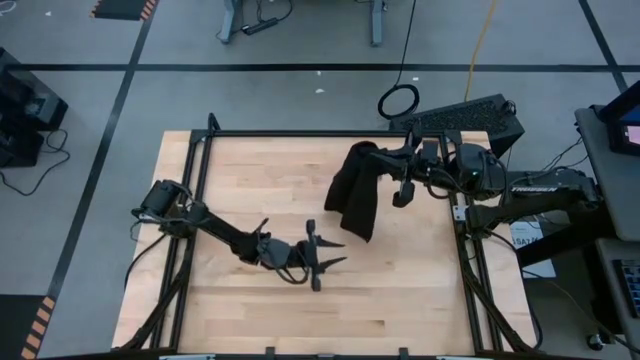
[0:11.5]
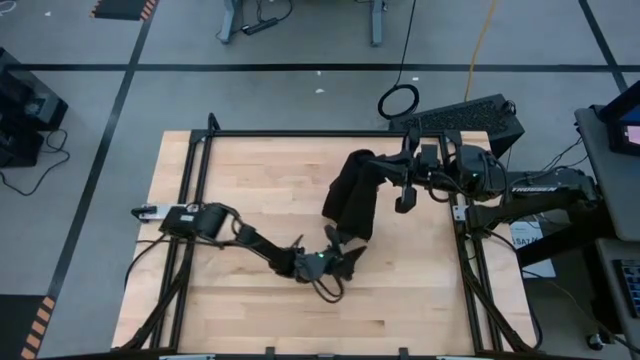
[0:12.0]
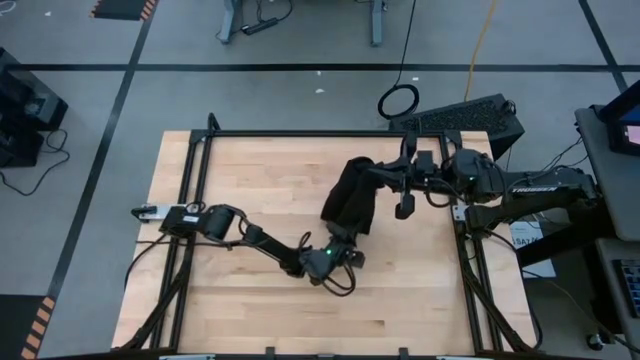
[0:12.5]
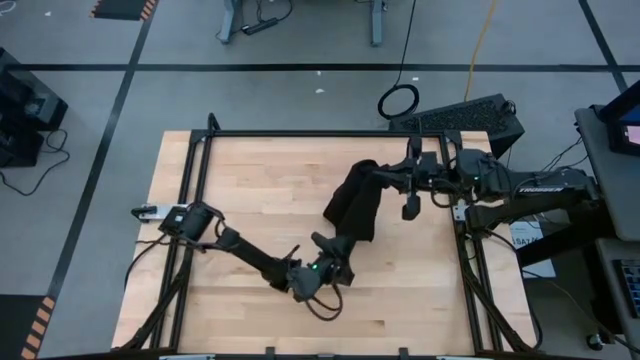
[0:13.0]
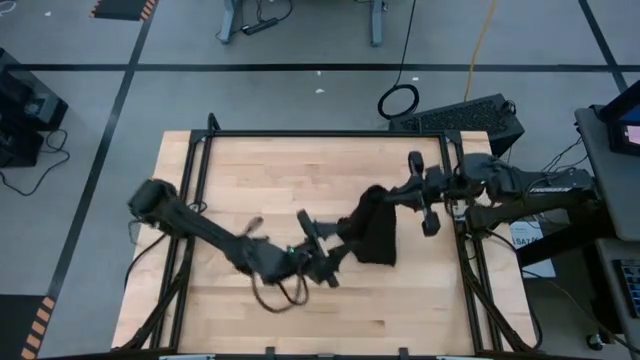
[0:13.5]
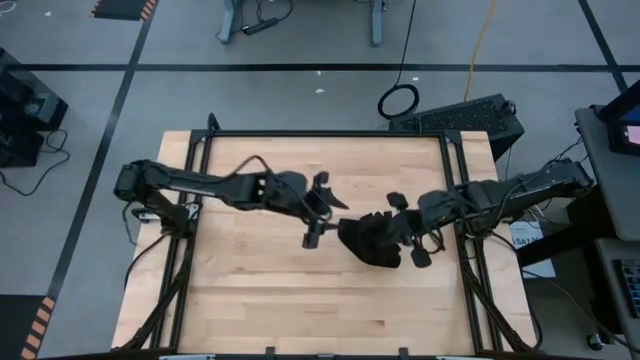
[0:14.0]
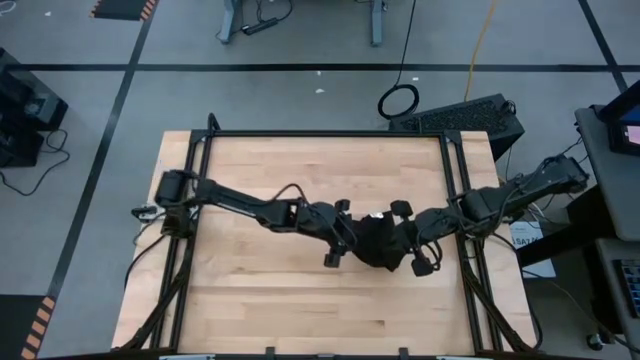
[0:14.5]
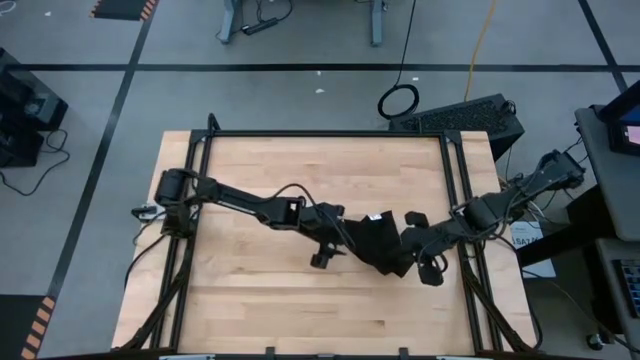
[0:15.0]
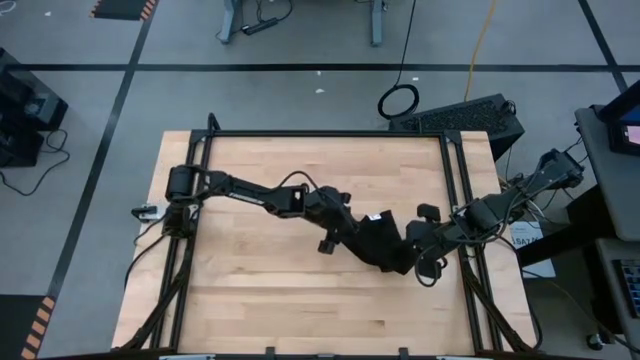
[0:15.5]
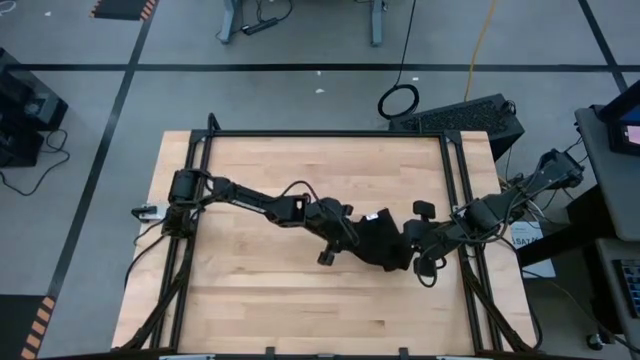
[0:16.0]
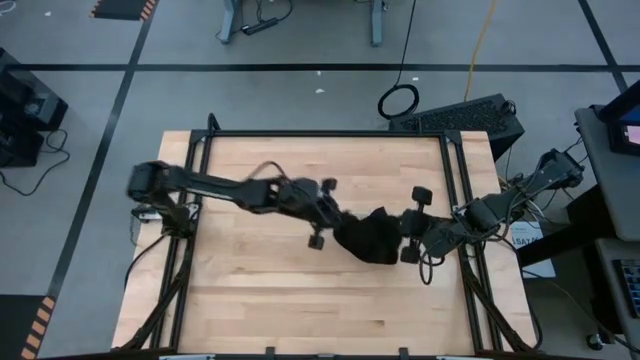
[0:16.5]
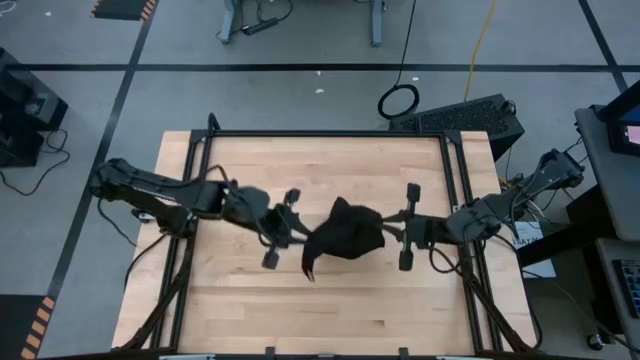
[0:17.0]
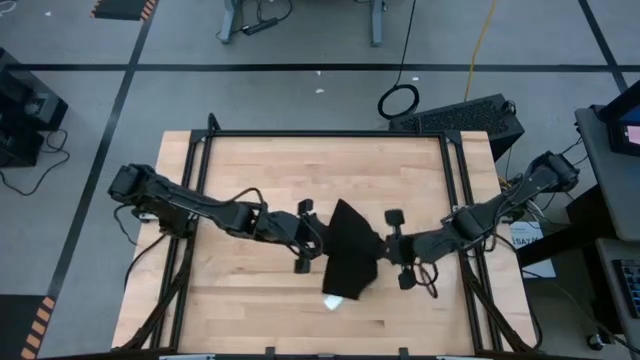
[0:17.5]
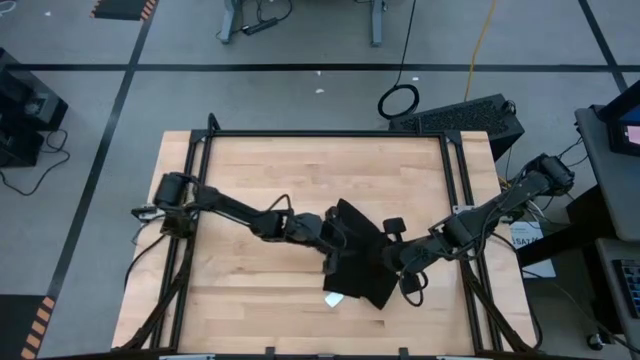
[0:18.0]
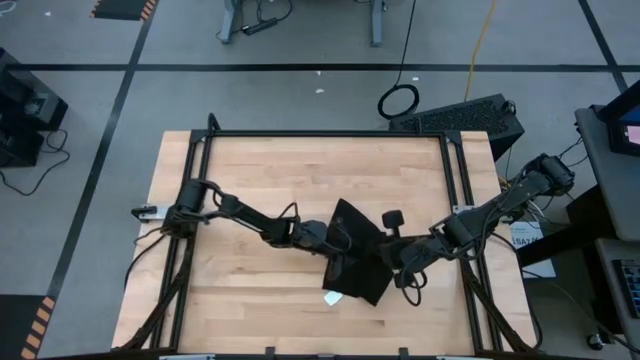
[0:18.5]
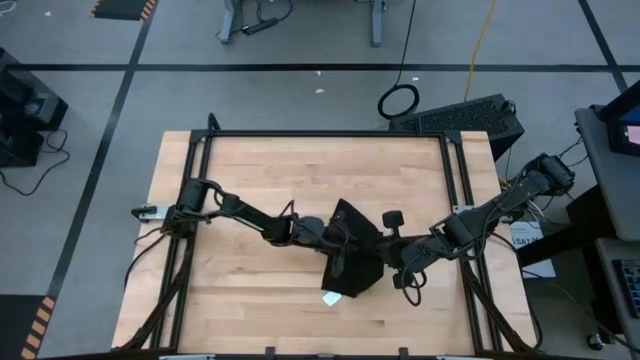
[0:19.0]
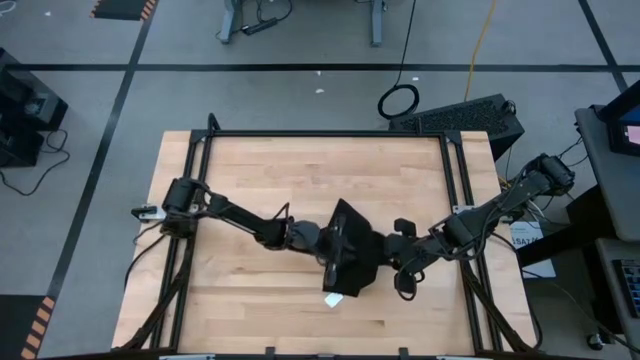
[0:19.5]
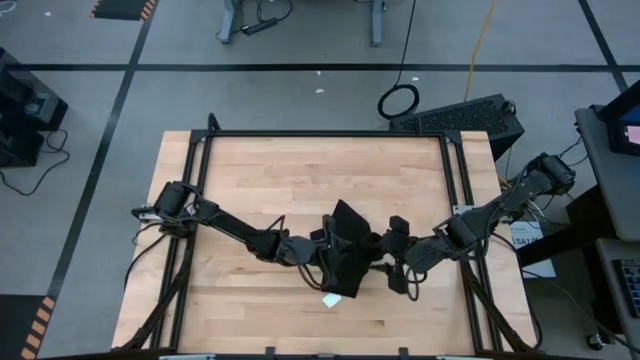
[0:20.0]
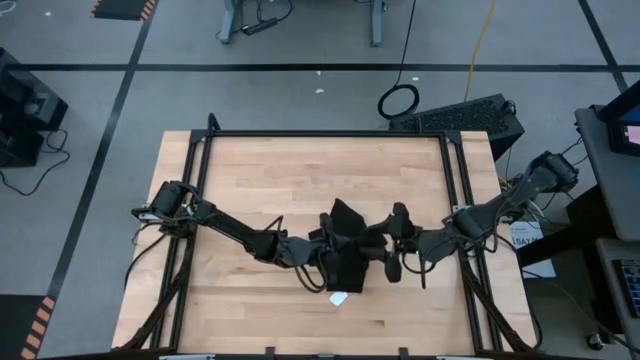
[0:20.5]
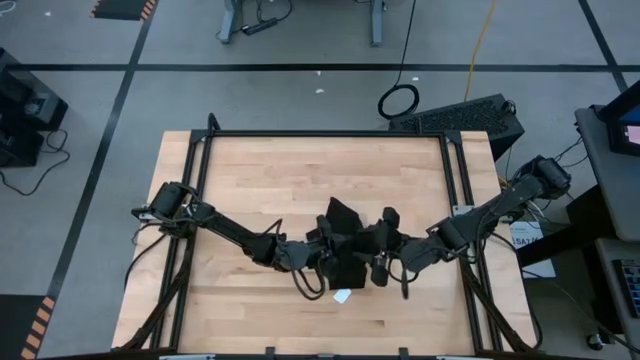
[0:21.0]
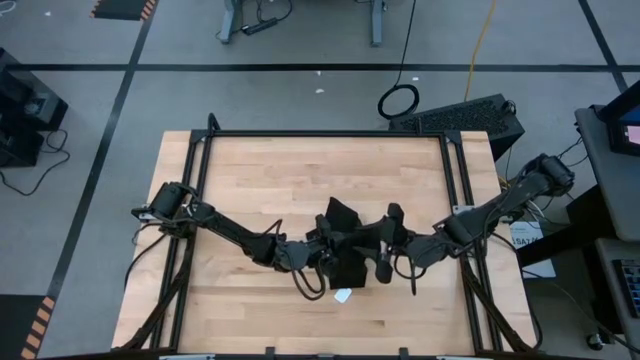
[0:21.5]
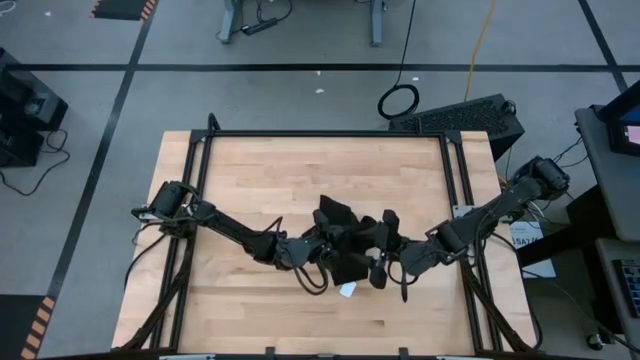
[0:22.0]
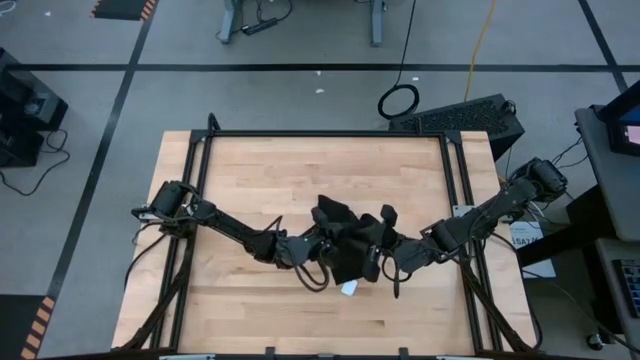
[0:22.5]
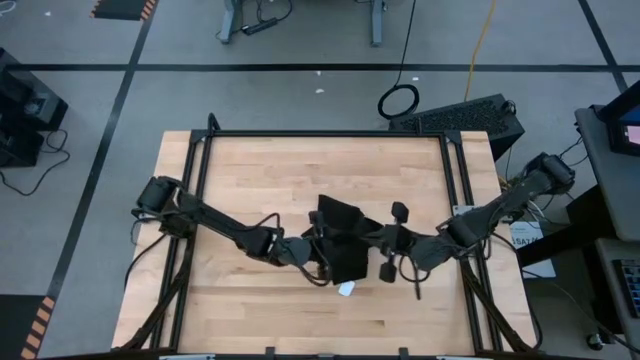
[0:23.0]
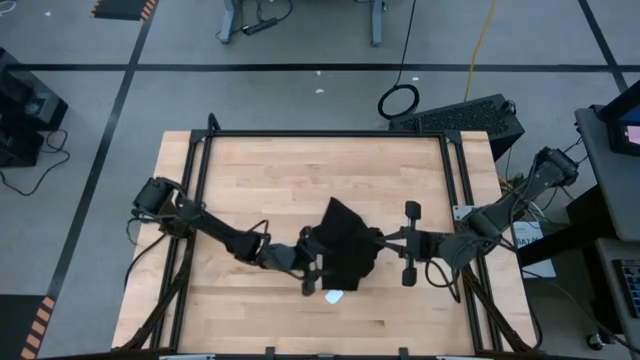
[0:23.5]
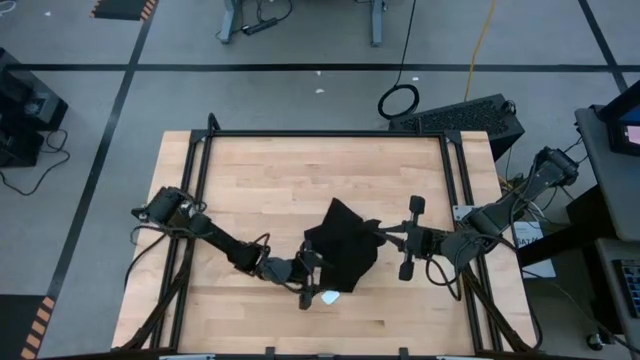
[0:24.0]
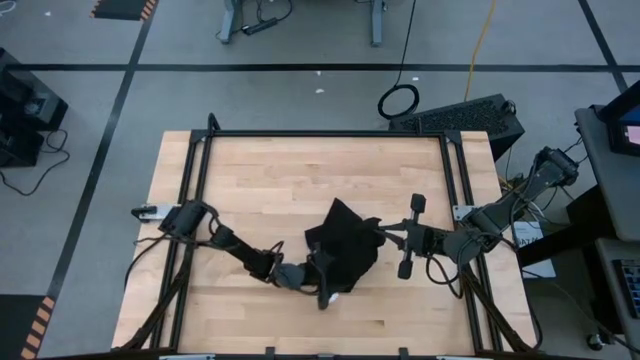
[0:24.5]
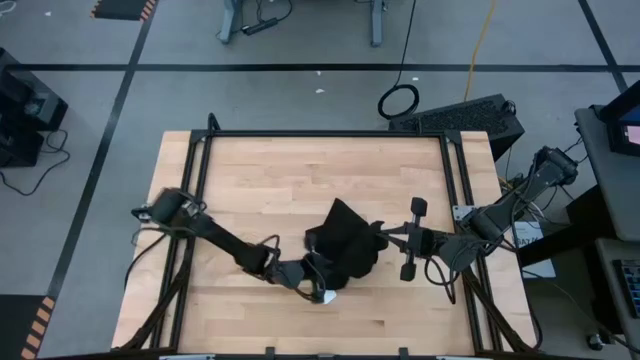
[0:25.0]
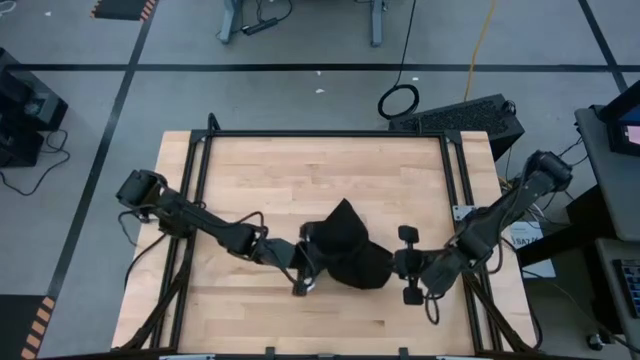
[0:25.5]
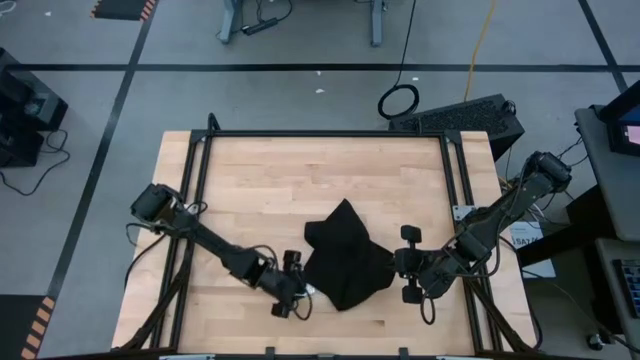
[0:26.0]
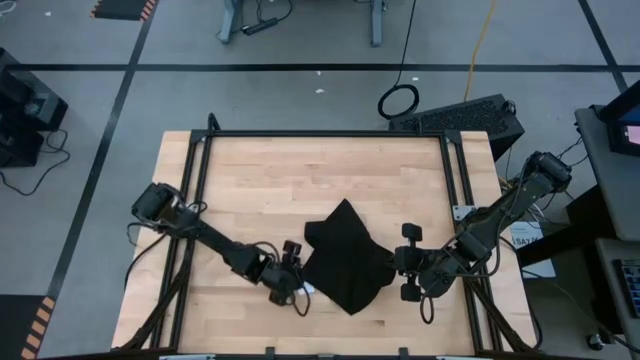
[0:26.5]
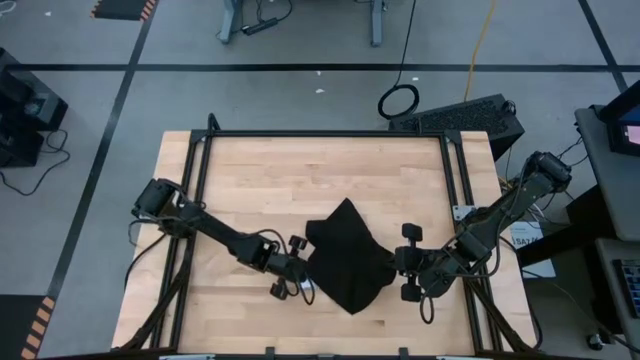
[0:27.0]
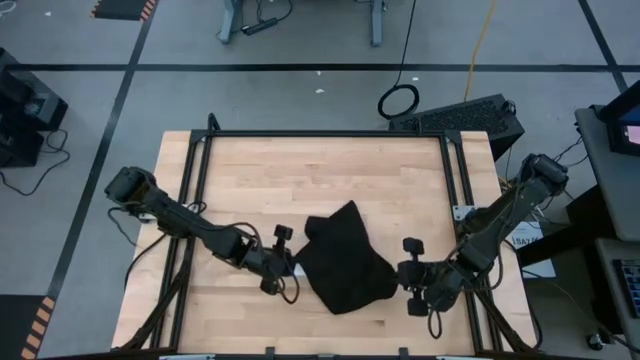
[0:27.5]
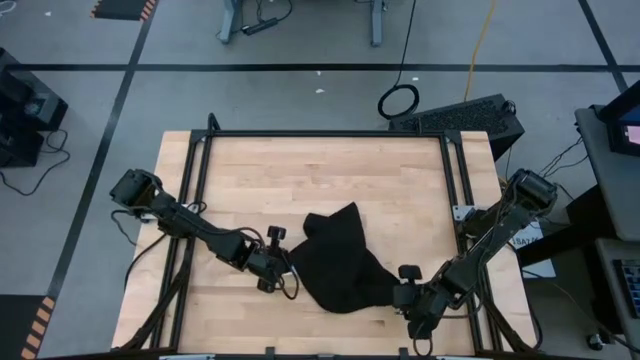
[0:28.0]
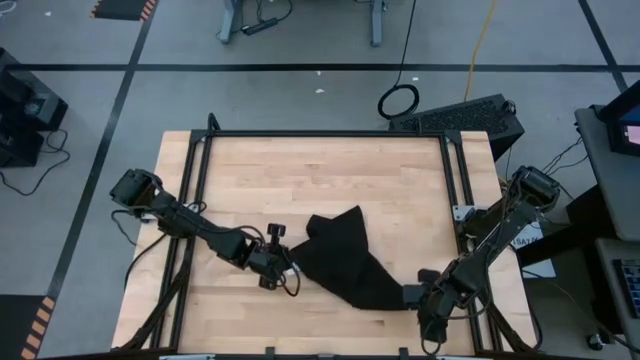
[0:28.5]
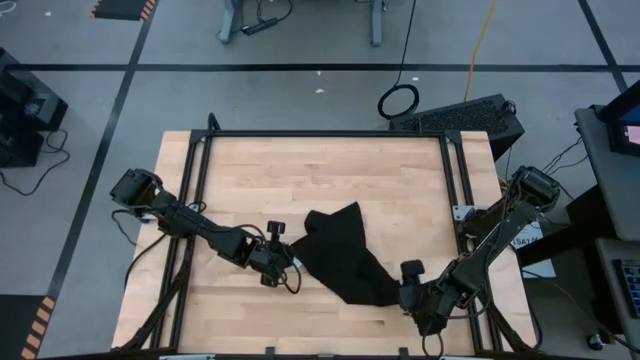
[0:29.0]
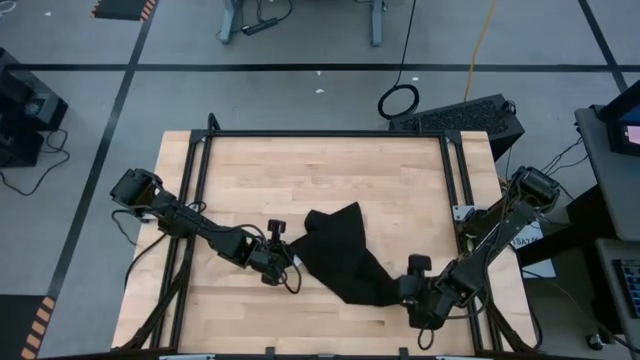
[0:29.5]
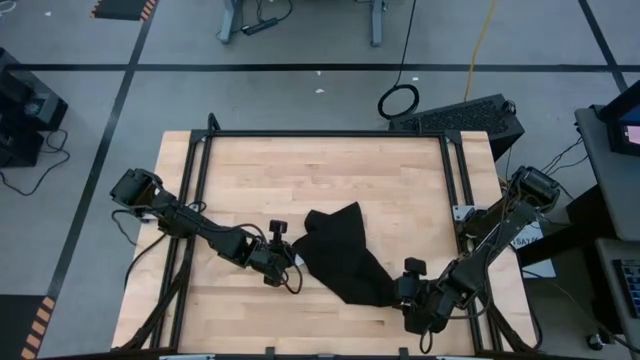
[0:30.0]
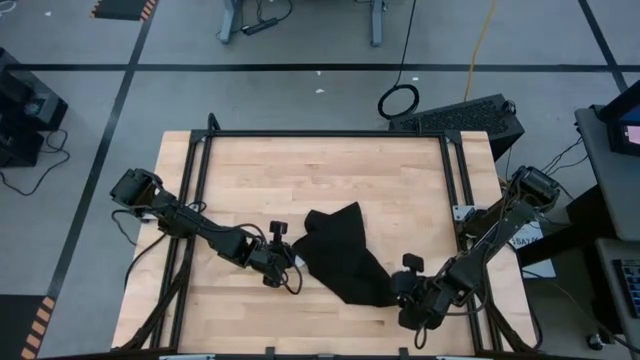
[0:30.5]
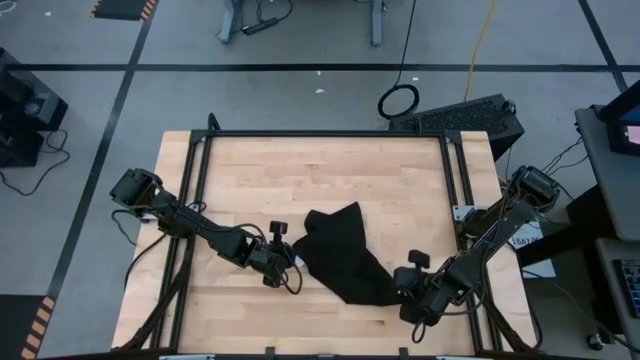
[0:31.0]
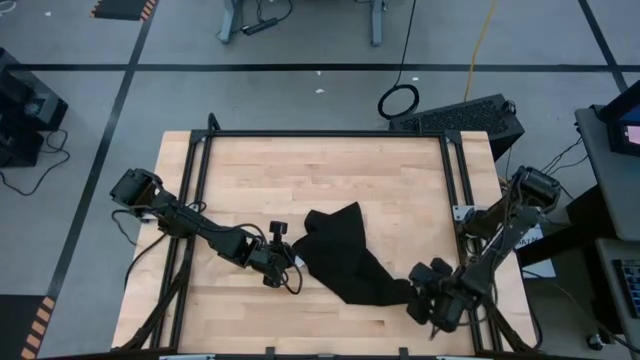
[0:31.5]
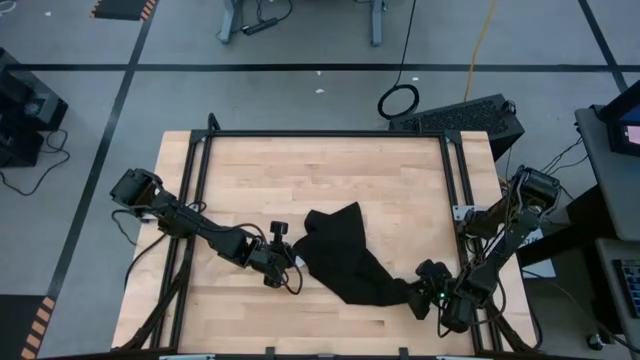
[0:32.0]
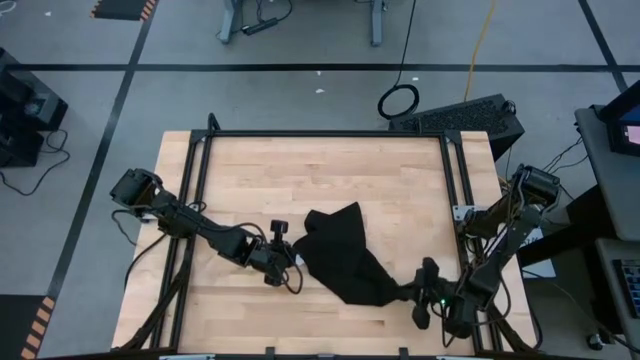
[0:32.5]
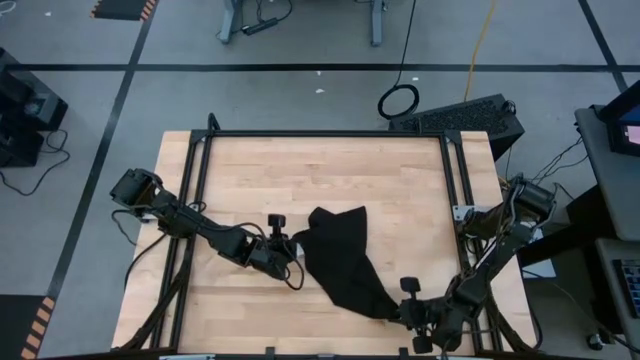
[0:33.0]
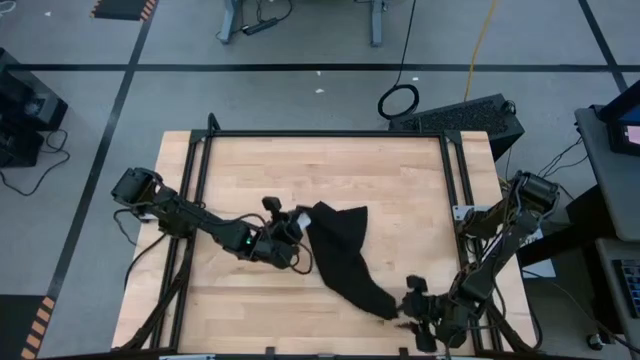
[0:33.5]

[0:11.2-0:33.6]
Task: Roll towel
Roll the black microfiber towel
